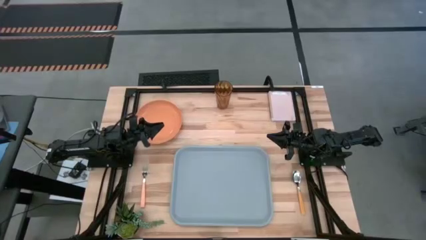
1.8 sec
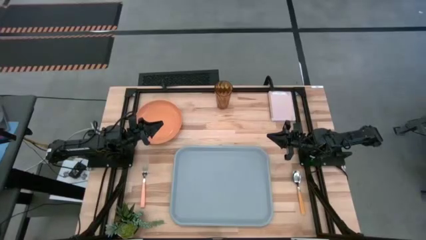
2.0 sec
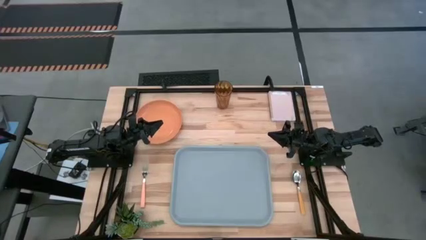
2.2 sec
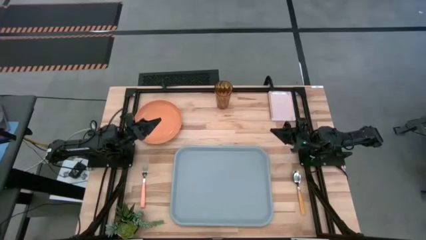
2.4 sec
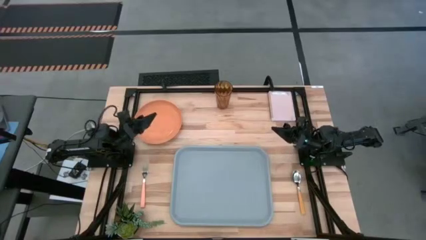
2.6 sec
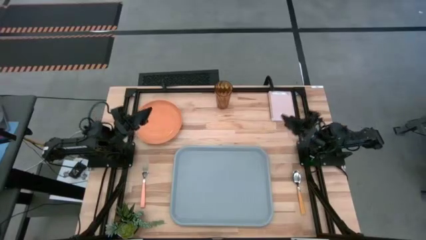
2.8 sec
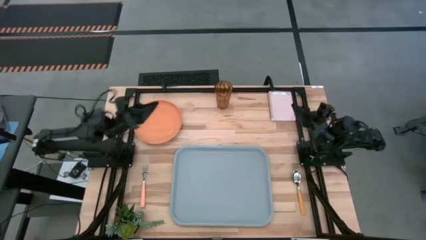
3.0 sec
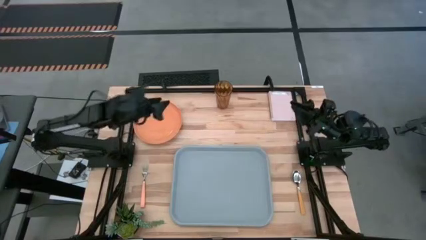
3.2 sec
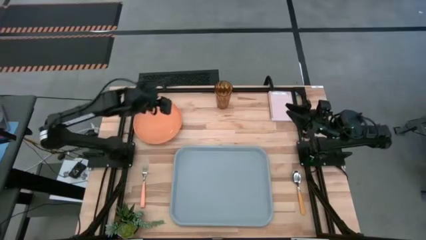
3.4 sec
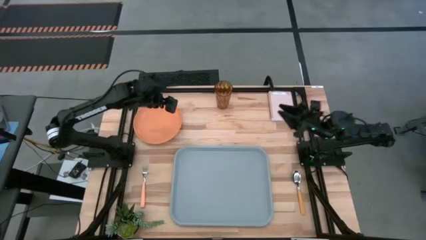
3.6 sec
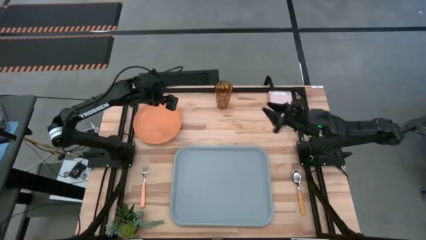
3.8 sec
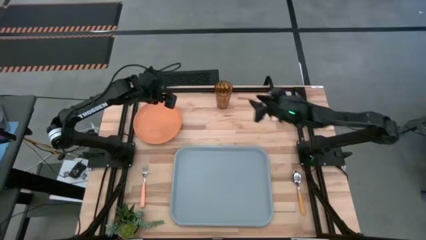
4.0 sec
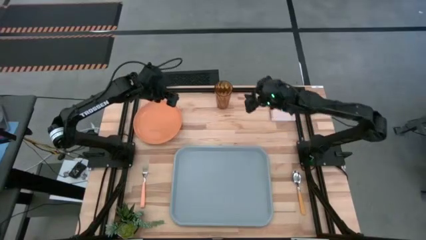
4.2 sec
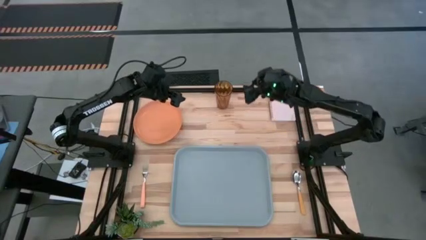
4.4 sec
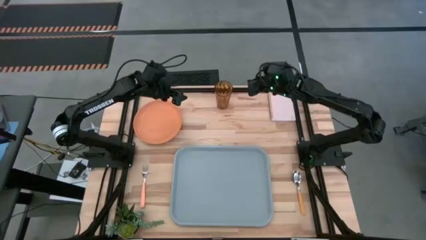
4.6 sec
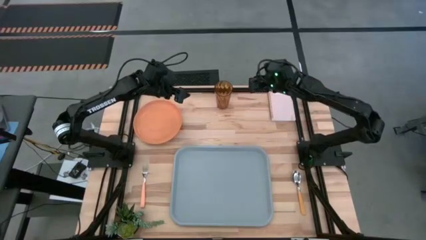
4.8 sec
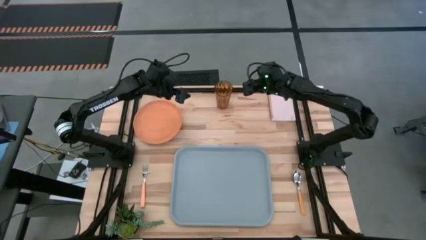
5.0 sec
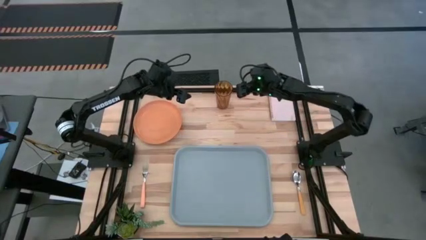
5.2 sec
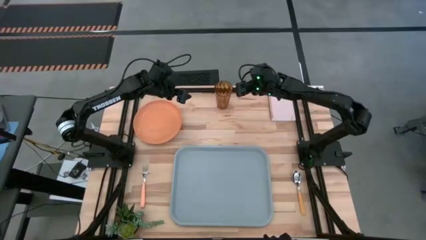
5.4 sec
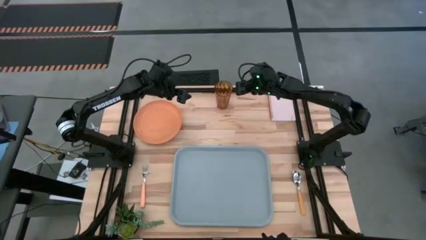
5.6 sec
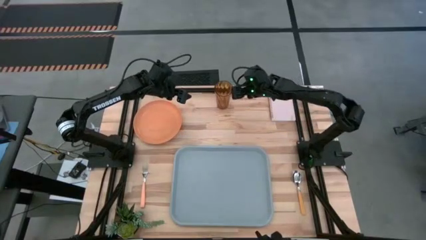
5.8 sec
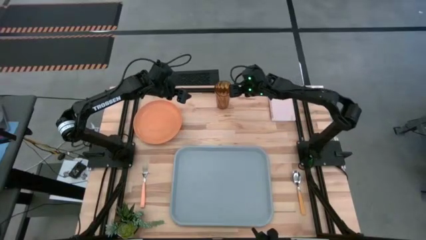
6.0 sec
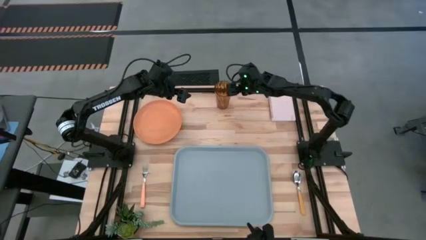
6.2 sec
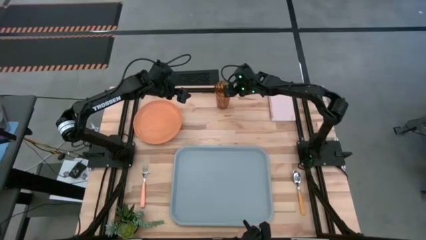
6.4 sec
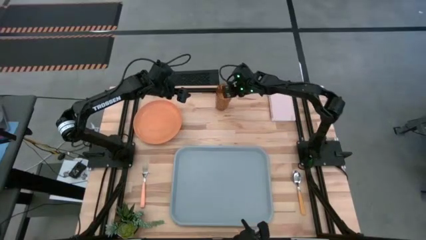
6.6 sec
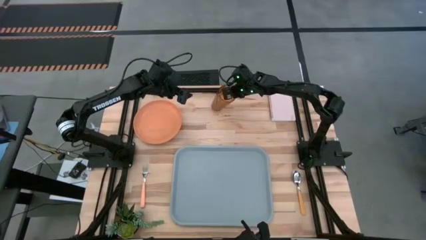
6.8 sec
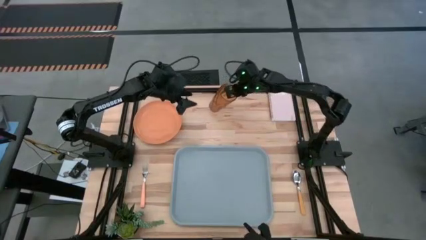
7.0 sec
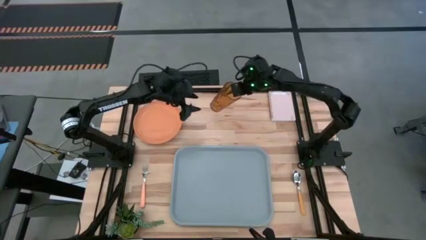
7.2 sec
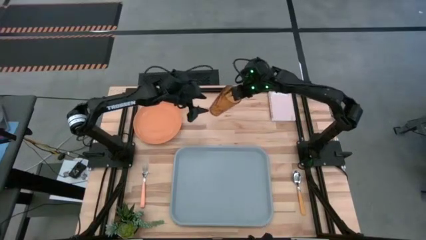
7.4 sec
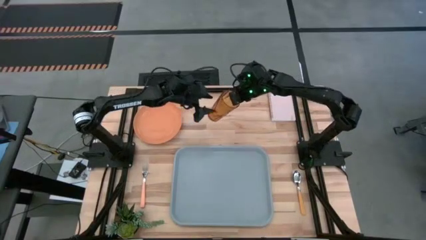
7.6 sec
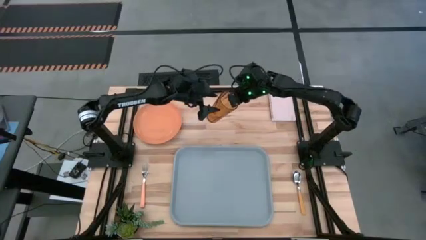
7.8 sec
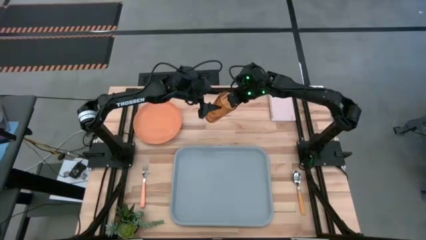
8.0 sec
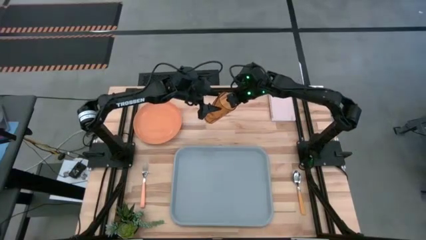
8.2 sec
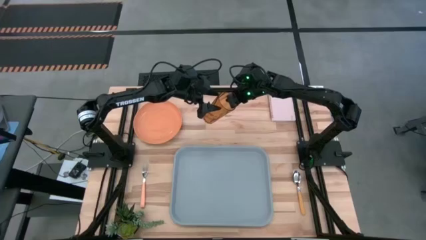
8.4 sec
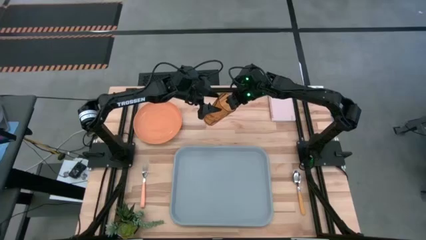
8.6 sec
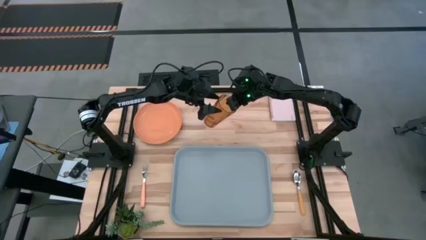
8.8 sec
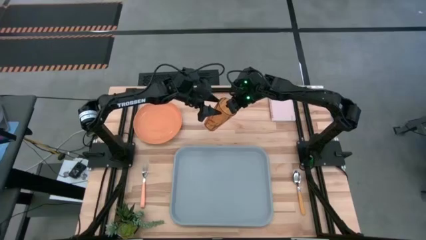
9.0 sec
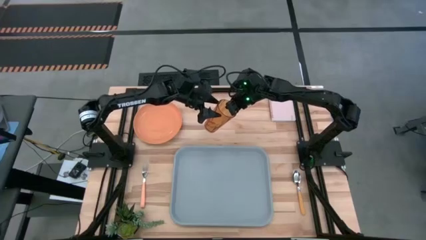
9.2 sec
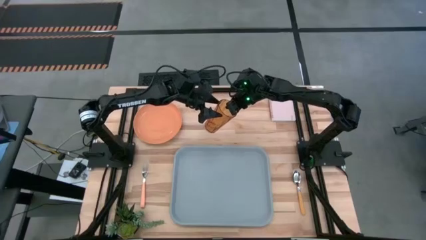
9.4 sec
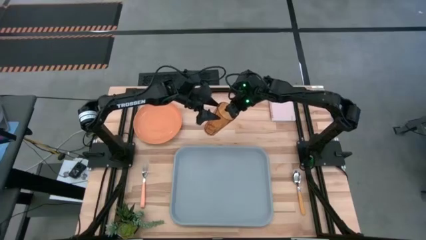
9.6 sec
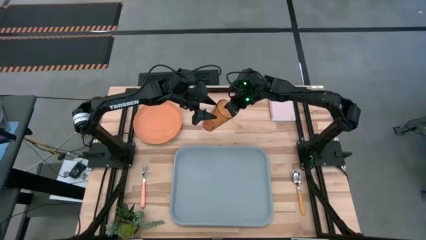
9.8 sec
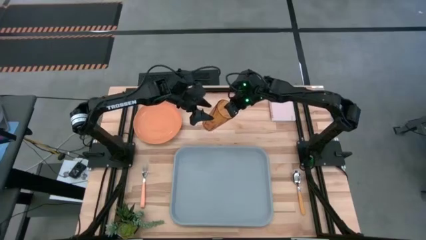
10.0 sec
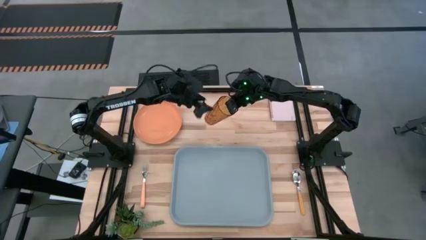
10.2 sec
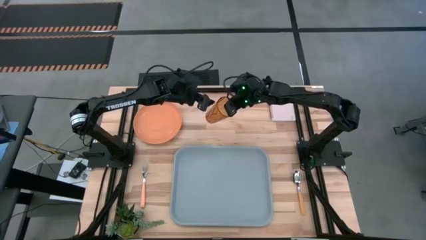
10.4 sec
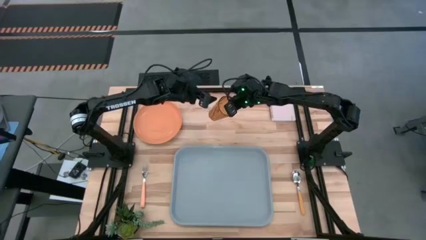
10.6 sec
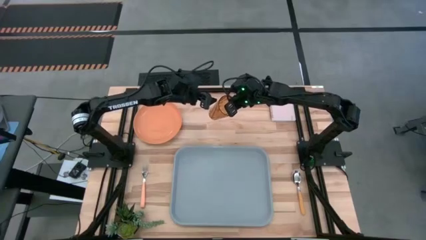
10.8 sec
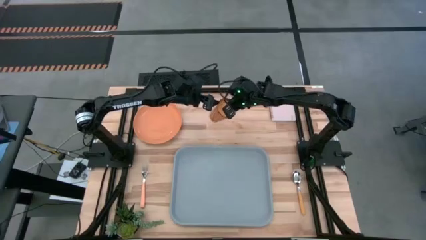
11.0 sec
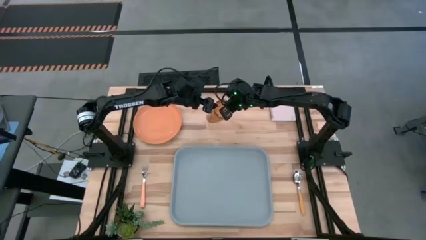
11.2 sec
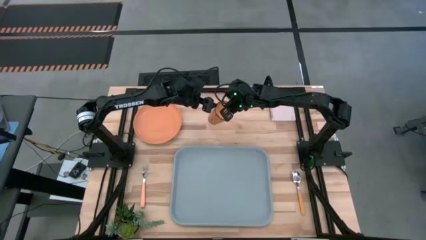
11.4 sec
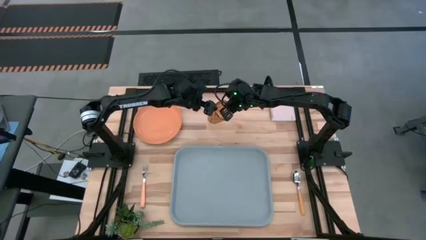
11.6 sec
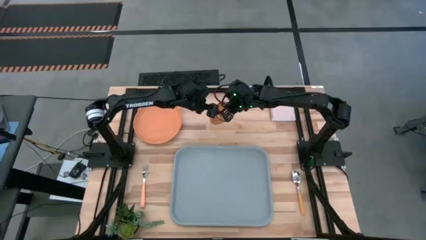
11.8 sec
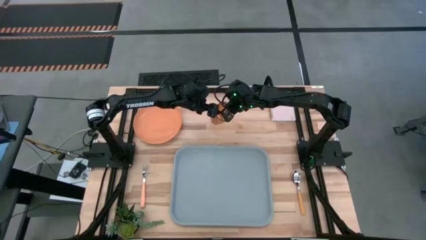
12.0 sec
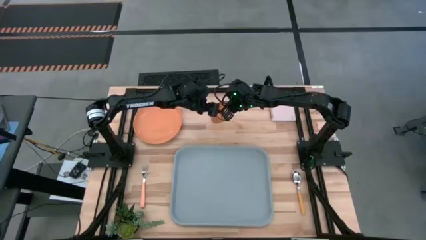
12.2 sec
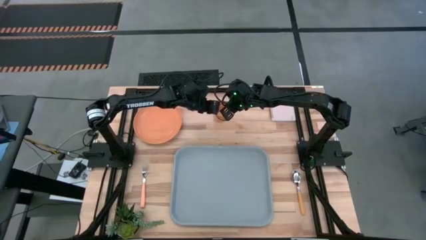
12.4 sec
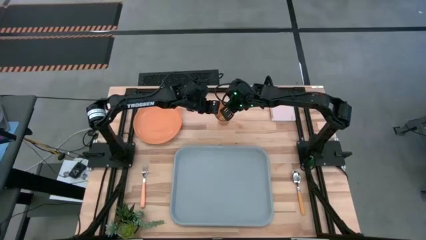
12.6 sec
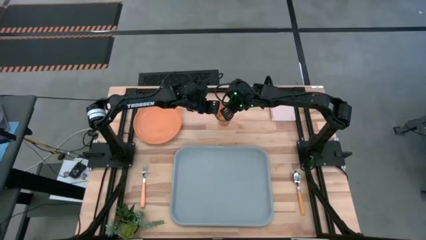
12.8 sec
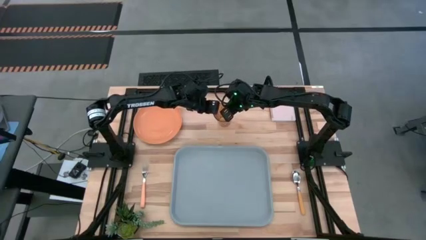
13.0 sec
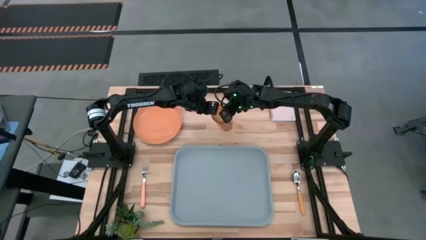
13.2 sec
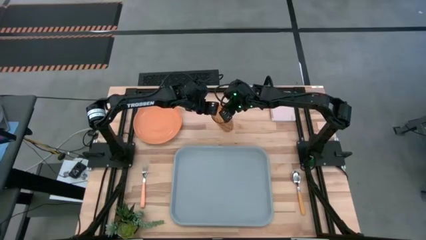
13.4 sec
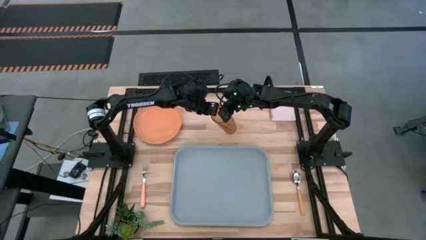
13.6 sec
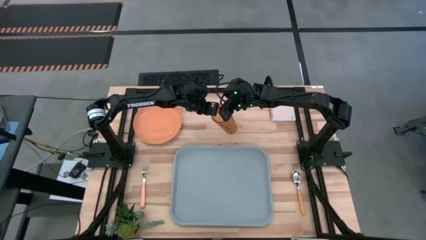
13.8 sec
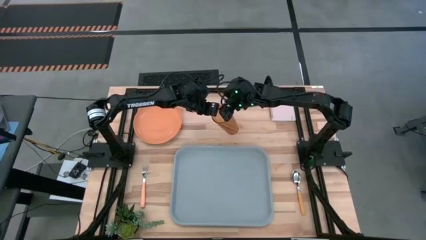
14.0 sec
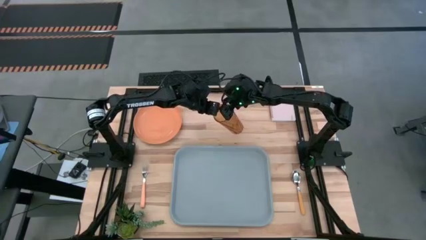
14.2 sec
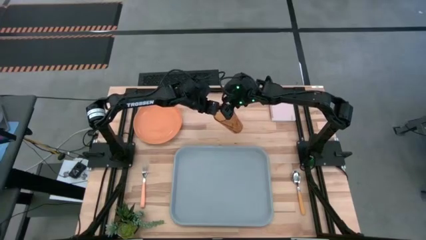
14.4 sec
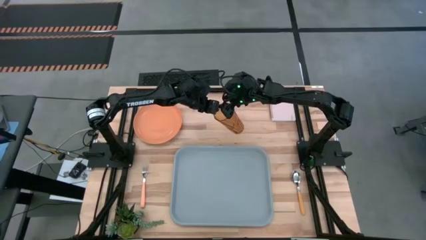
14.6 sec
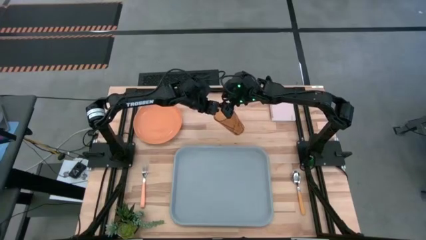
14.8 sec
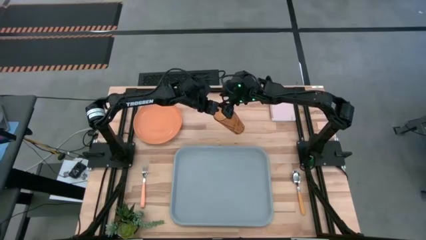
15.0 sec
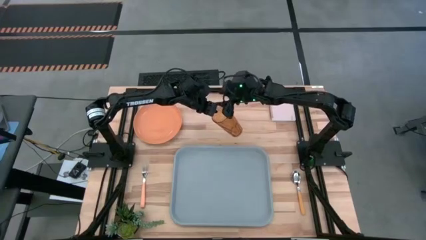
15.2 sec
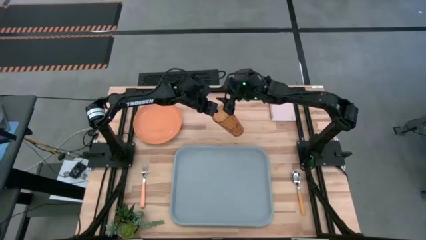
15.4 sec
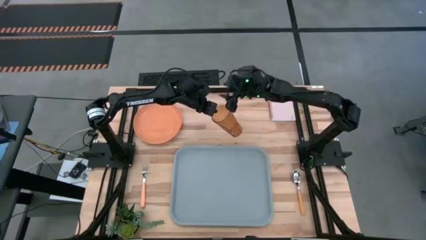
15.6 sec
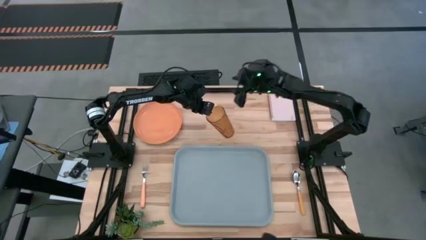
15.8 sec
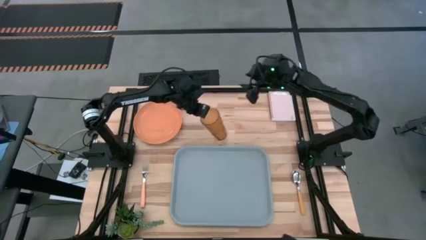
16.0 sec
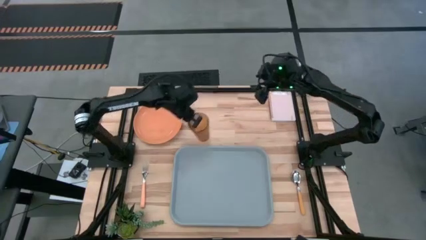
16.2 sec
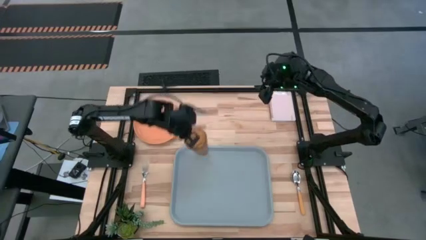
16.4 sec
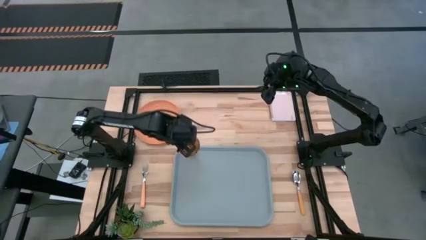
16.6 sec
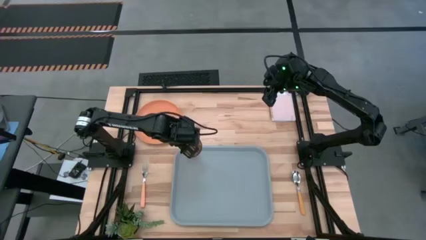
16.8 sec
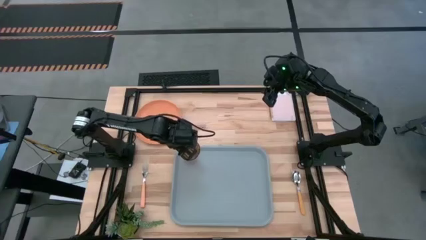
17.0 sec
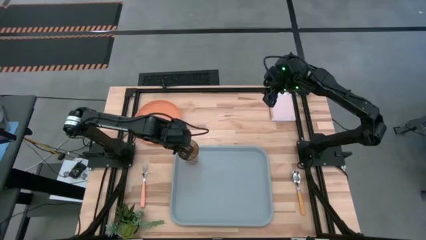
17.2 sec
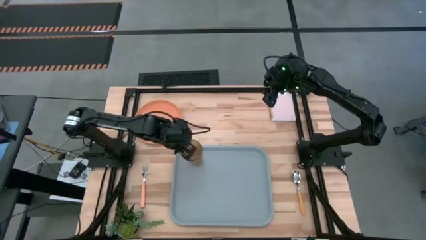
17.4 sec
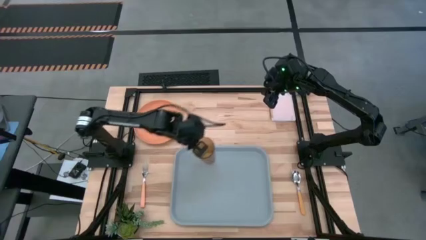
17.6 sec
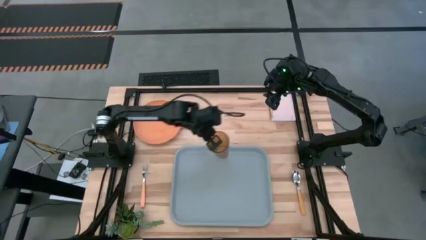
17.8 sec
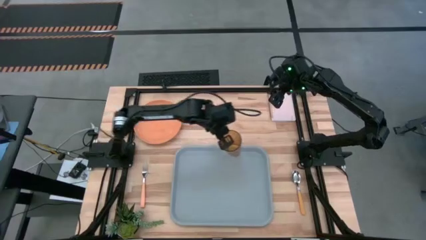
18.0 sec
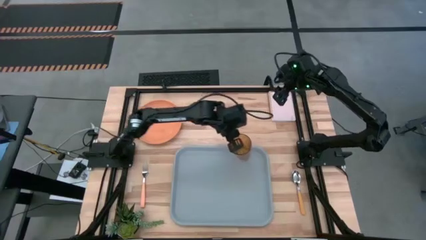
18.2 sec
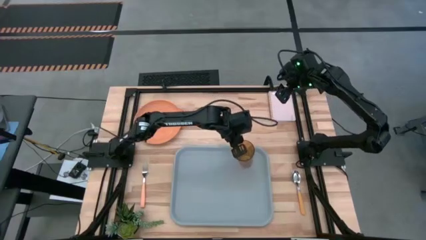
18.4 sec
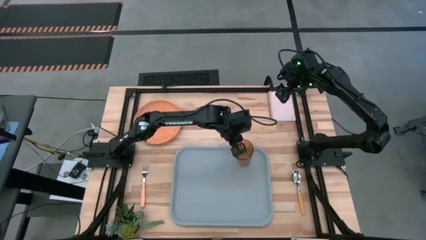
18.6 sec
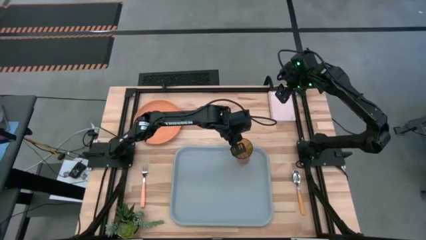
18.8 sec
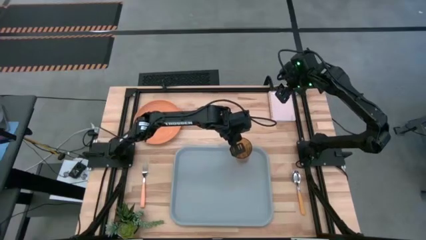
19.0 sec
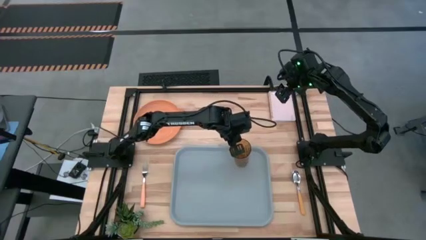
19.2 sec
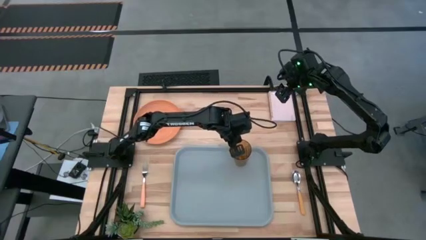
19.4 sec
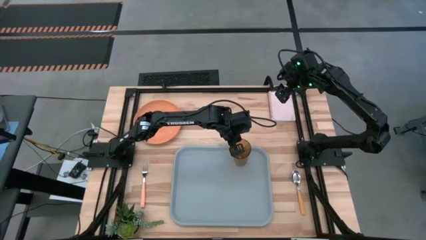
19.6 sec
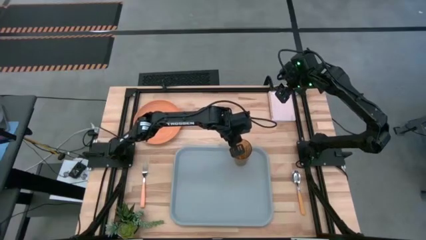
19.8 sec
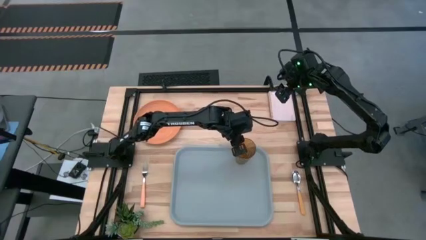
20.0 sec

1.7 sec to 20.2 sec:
Task: Pick and place plate/cup/fork/spoon on tray
Put the brown cup on the blue serving tray
